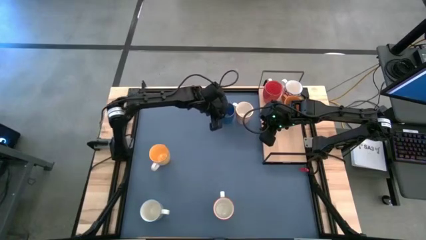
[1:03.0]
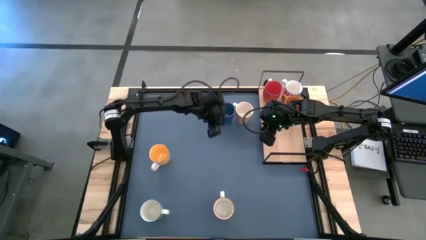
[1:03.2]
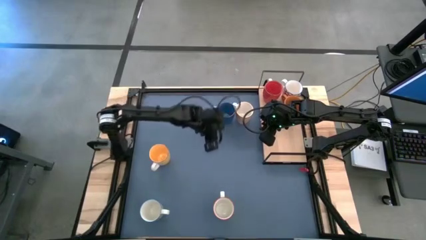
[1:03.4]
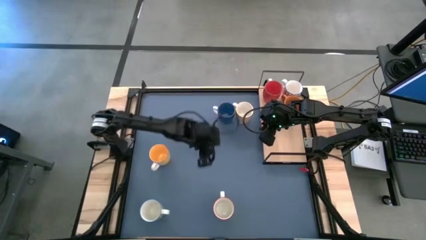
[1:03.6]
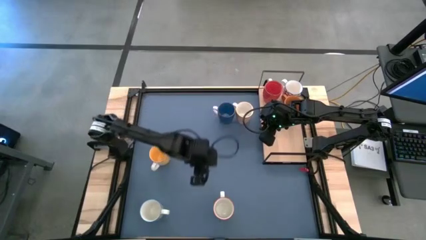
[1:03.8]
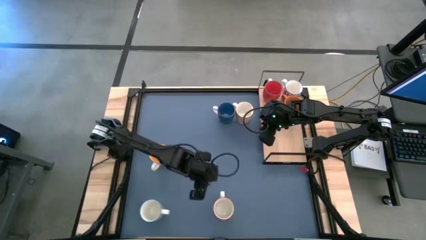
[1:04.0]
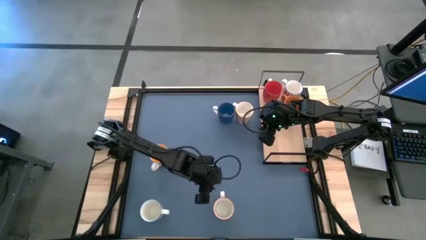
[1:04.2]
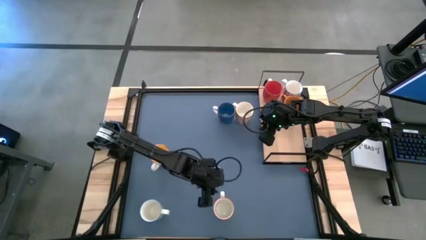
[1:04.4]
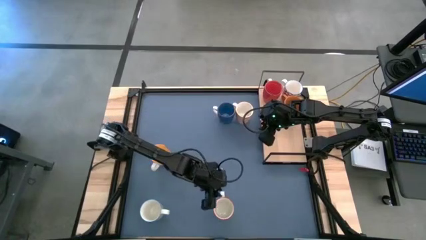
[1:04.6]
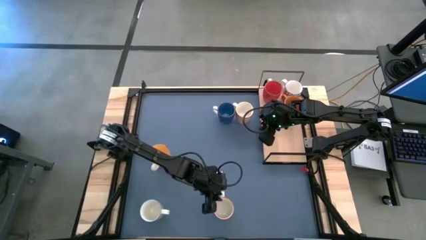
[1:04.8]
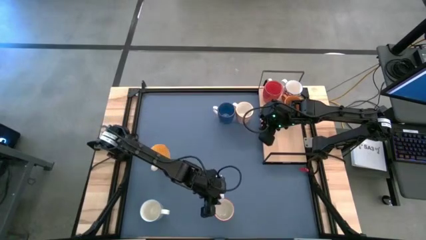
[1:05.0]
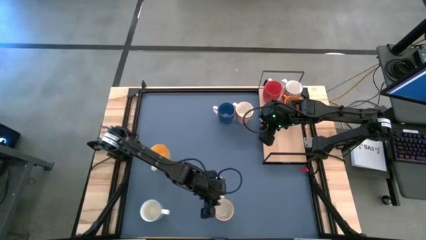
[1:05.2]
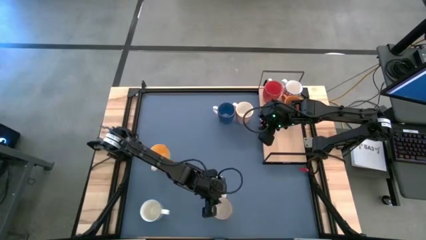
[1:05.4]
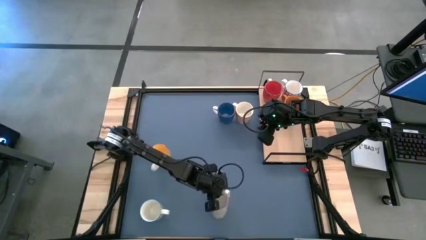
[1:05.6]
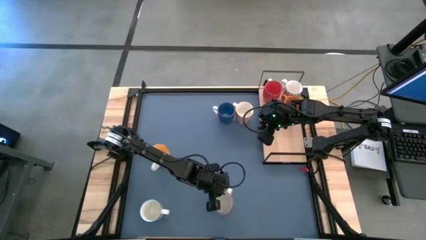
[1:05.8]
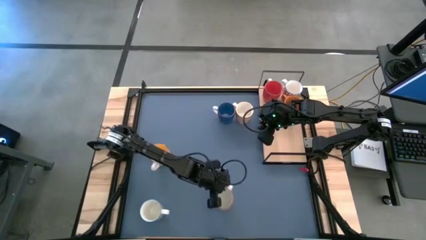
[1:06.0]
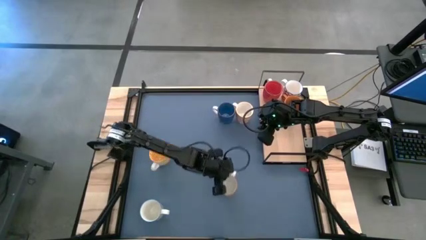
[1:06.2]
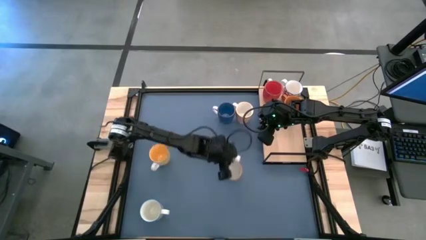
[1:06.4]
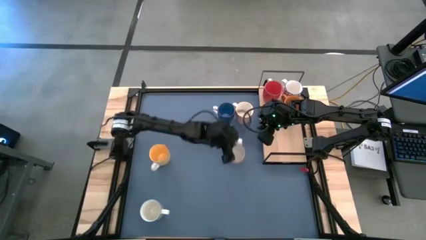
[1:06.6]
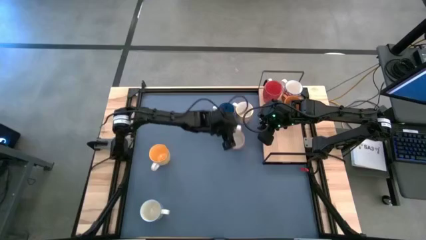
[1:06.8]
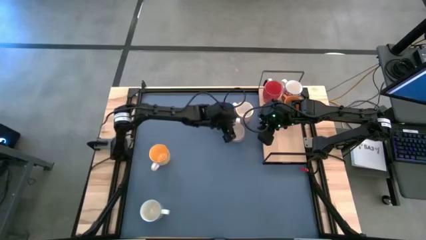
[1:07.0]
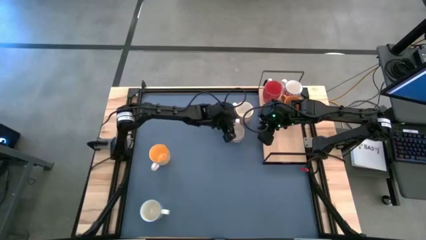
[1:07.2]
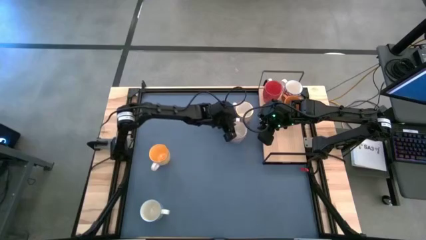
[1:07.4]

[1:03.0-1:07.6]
Task: Place coffee mugs
Move the right gray patterned mug to the top middle

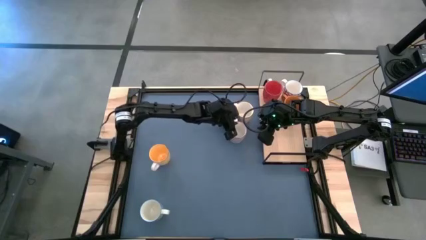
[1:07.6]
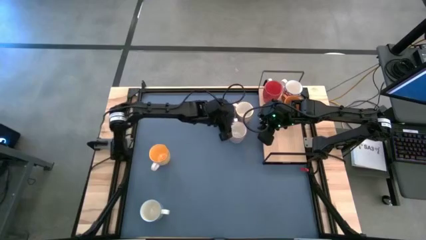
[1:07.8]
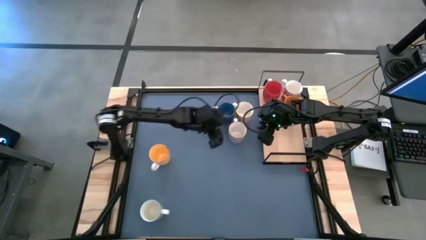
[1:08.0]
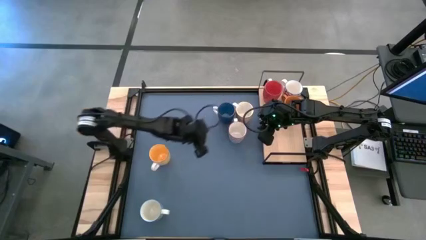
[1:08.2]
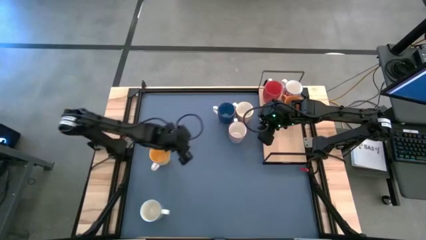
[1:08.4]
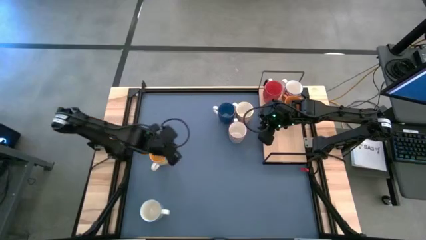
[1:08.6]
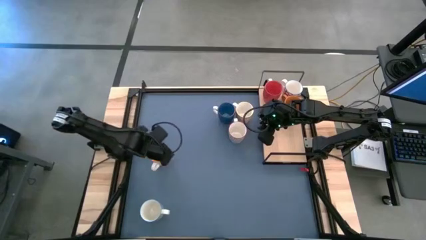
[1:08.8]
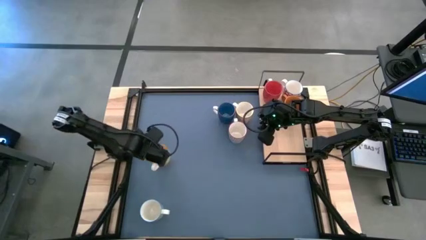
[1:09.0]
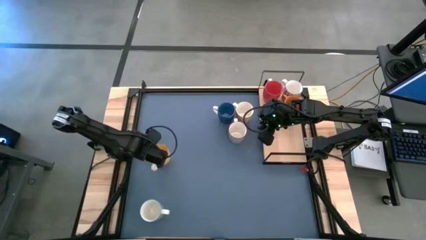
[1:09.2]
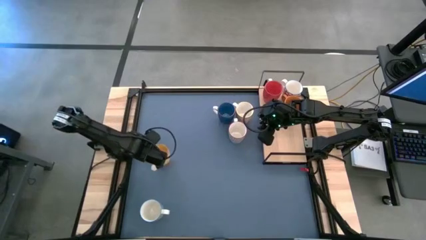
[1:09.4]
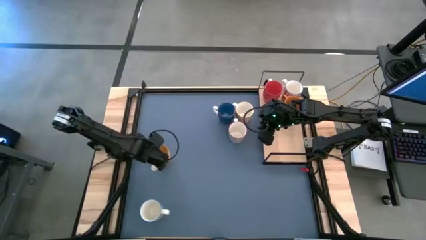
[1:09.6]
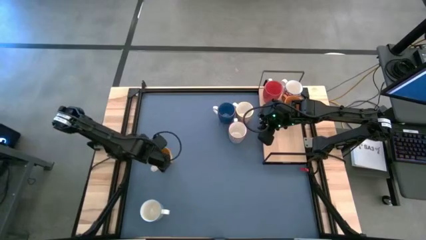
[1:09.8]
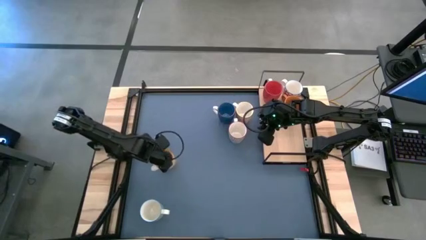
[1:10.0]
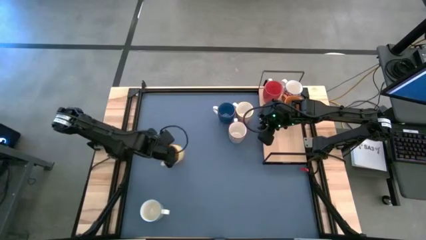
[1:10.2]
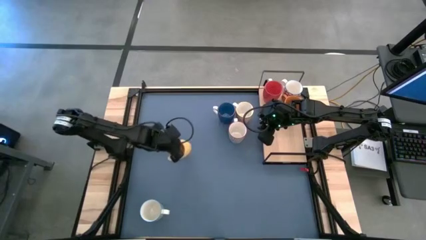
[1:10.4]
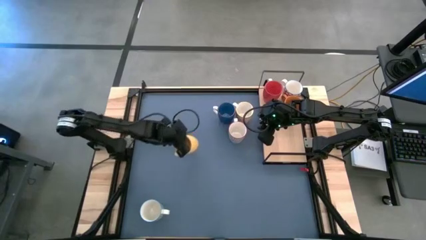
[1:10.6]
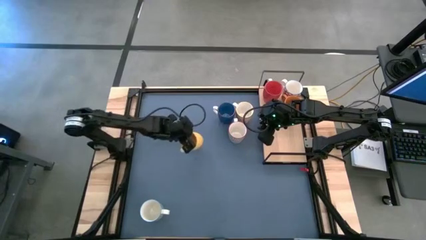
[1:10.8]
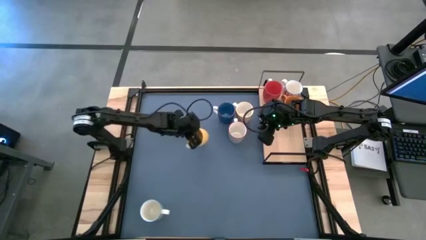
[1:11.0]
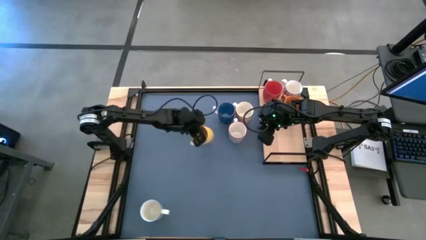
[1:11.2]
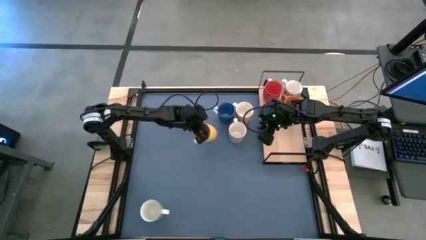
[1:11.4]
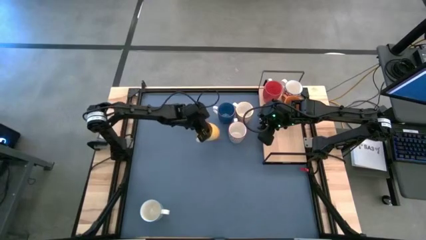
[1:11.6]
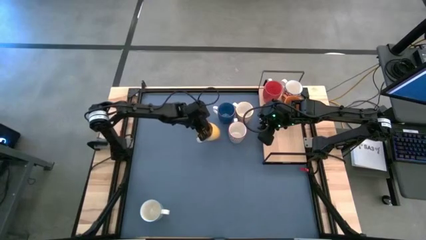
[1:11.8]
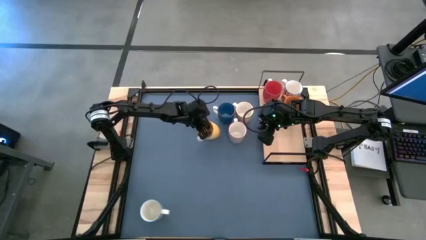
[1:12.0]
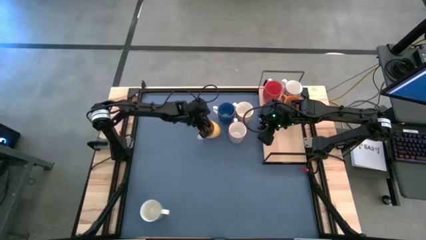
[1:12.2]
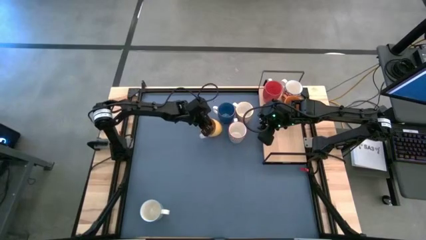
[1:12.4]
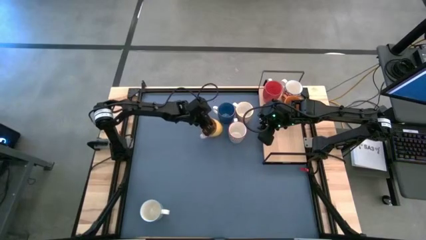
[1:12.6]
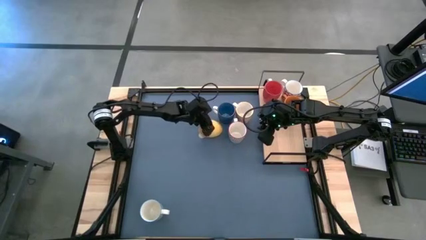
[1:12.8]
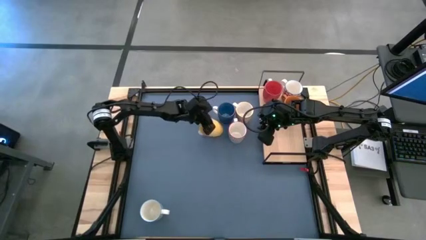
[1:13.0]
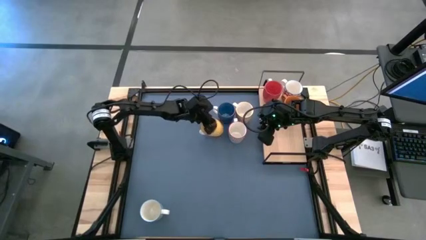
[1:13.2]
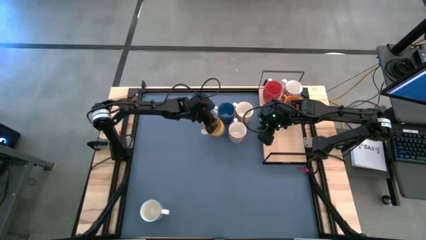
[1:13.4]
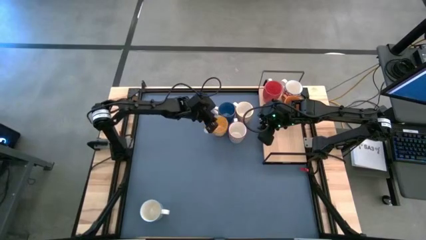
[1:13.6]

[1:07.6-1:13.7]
Move the yellow mug to the top middle

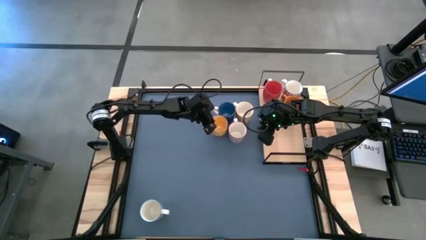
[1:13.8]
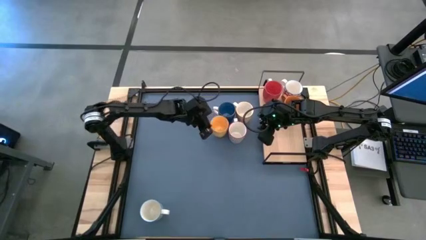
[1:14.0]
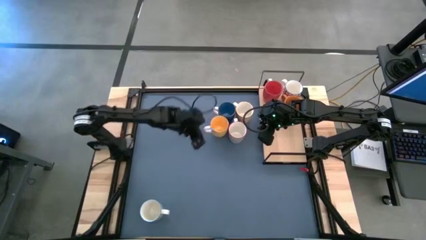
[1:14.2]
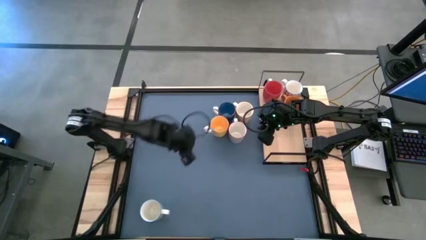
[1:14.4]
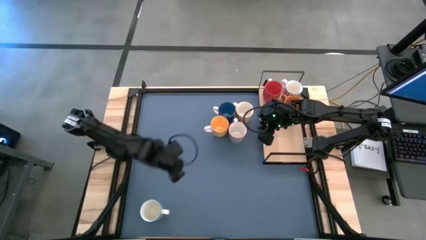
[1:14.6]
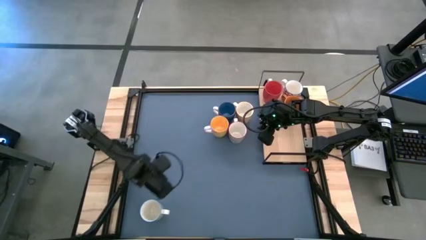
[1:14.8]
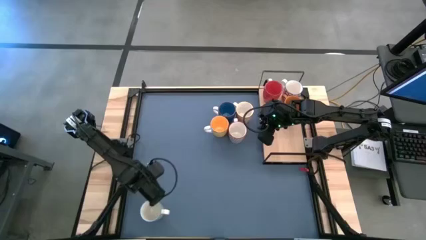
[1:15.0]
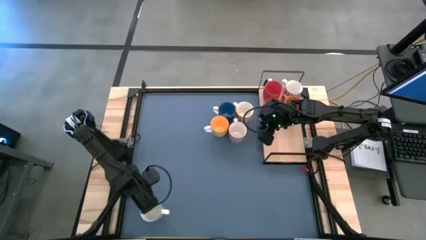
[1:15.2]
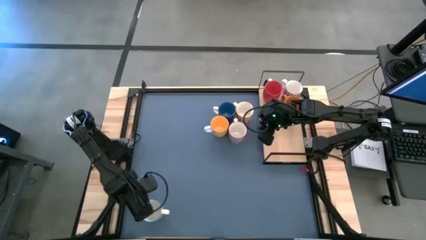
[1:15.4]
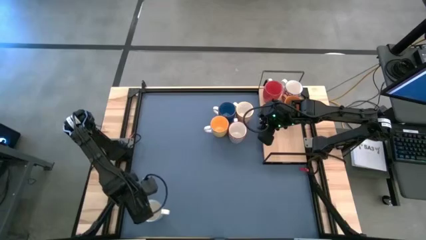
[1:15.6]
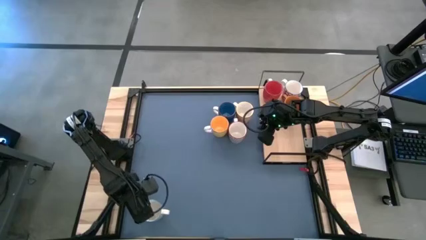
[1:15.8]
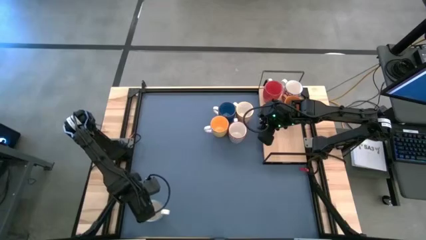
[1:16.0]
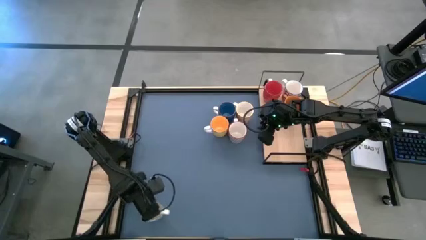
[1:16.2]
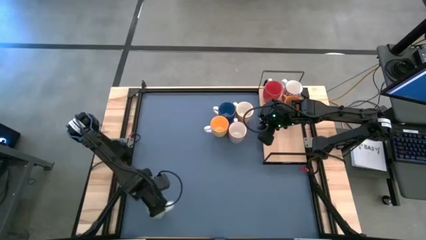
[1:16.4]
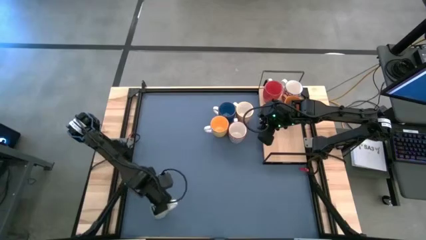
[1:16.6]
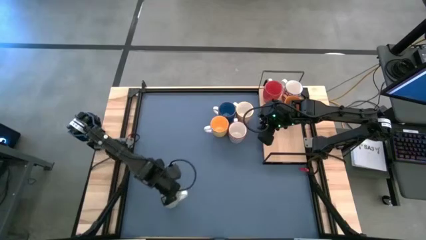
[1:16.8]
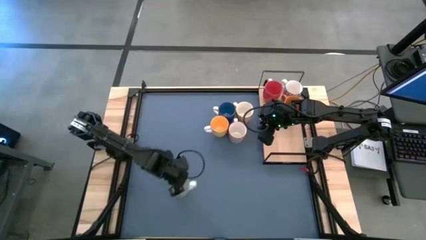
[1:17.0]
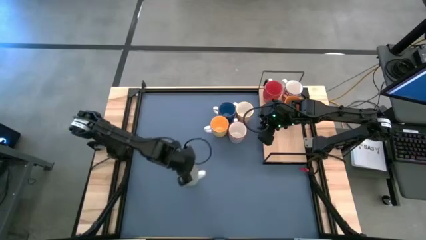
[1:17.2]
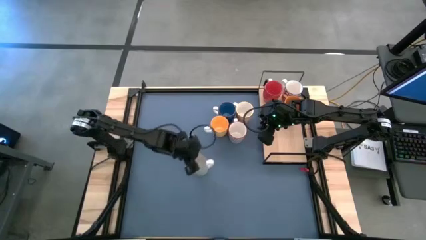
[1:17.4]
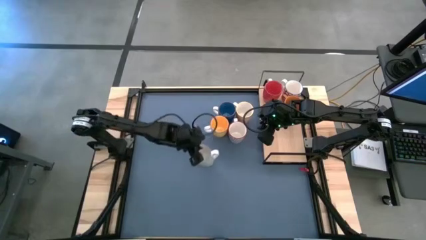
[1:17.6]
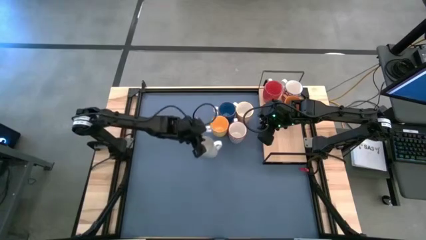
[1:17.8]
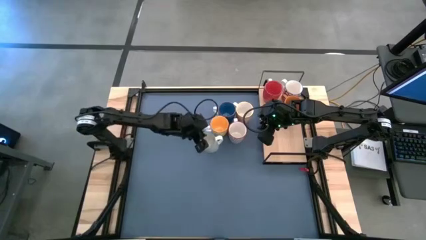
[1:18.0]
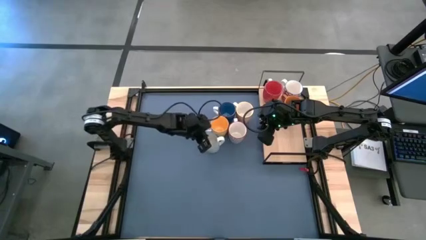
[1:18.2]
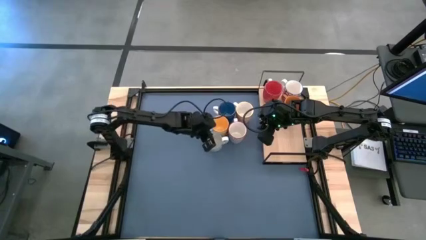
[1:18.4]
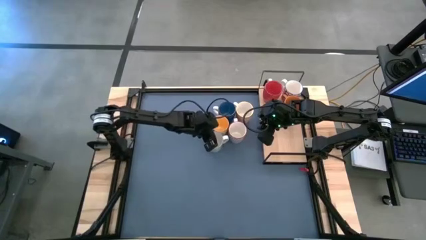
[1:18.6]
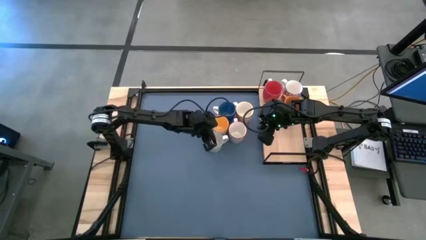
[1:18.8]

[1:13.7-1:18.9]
Move the gray patterned mug to the top middle
